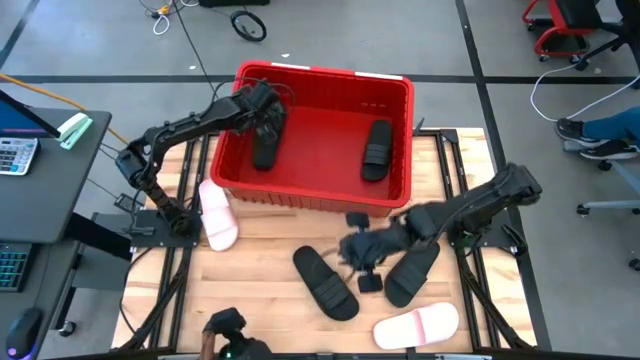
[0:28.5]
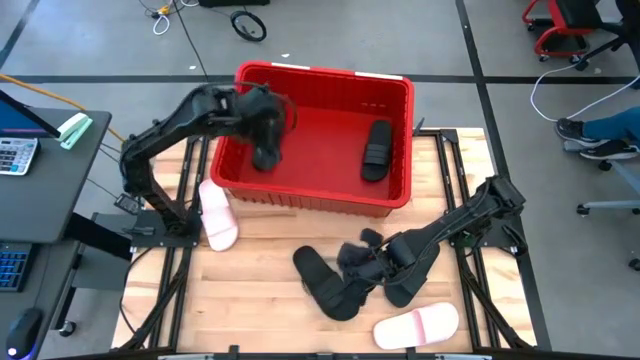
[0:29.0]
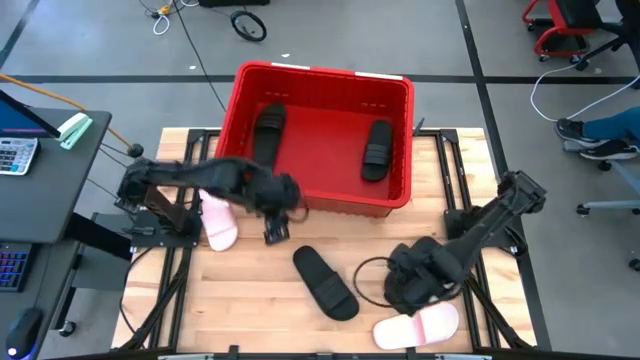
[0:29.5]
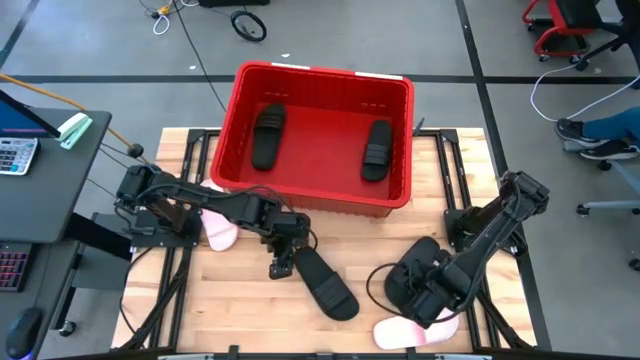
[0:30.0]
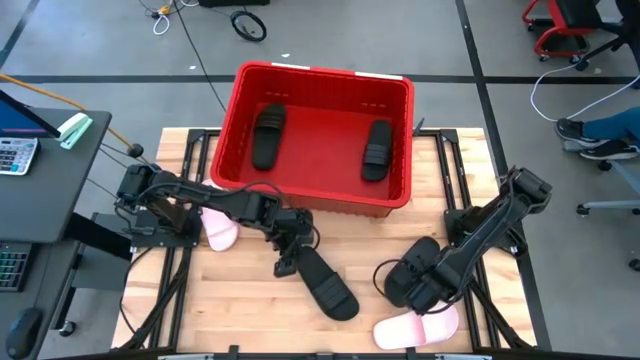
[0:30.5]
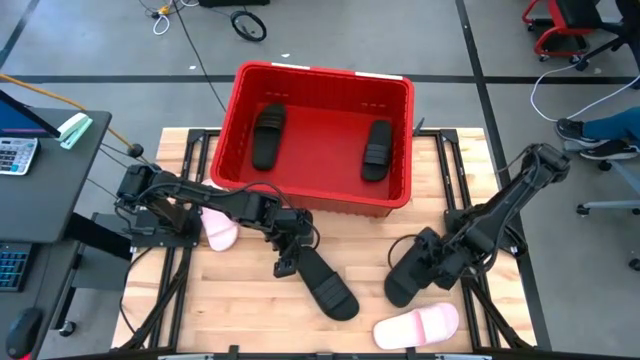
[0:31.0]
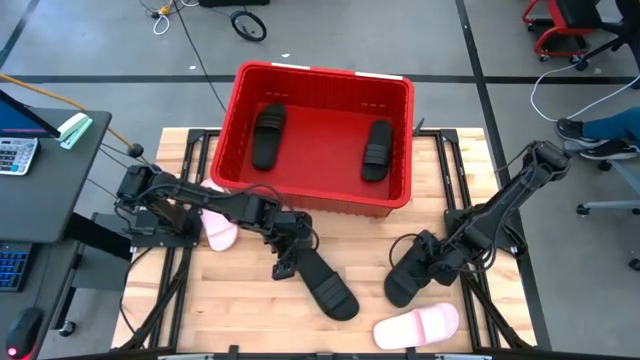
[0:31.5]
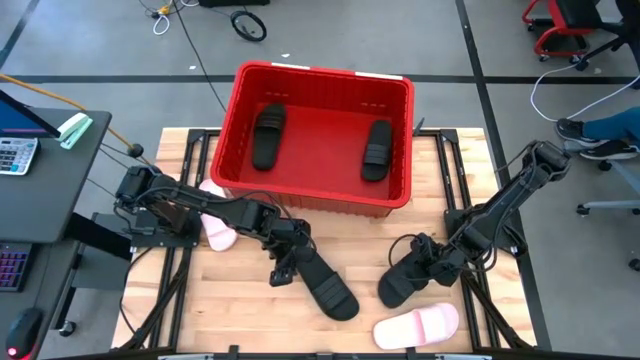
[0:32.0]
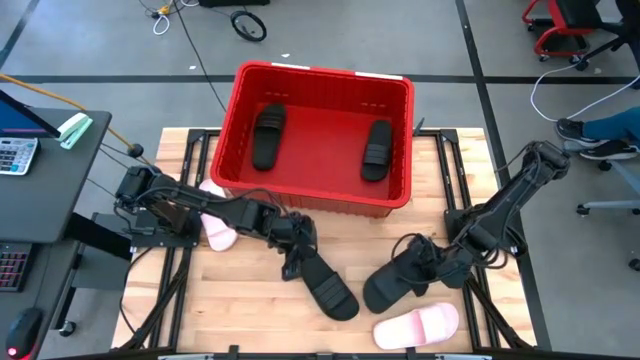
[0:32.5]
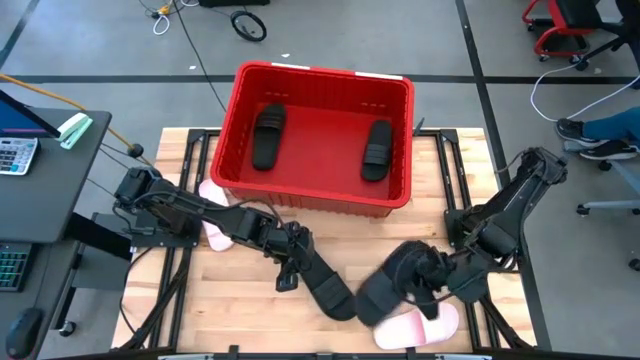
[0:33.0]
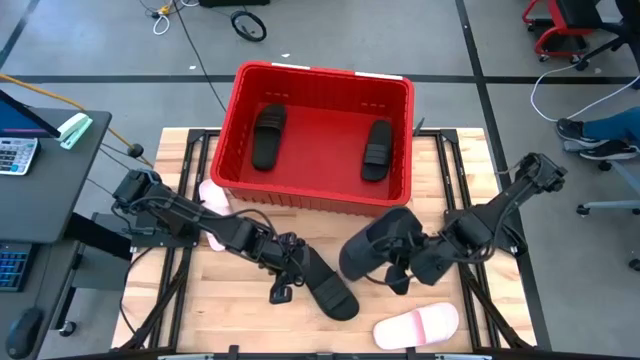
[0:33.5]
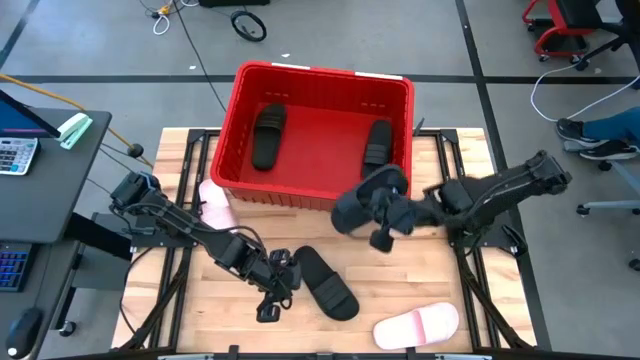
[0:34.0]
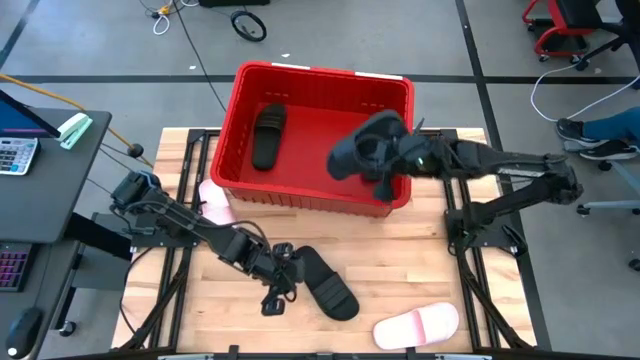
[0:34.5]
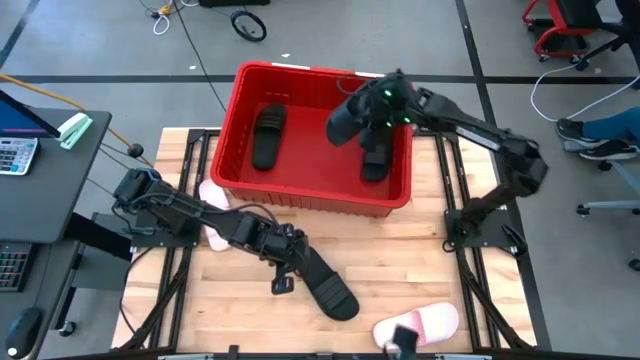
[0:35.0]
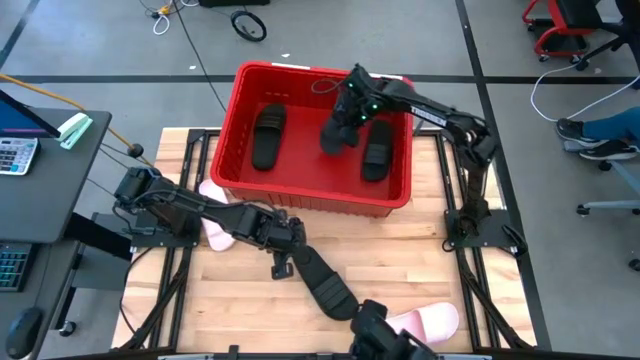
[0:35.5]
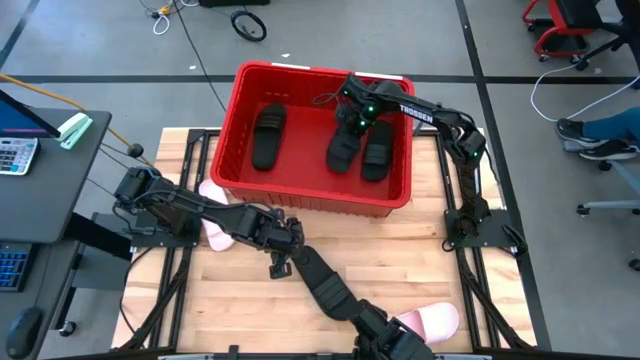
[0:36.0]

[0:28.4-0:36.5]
Task: Pick and place slides into bin
Put the black slide into the bin

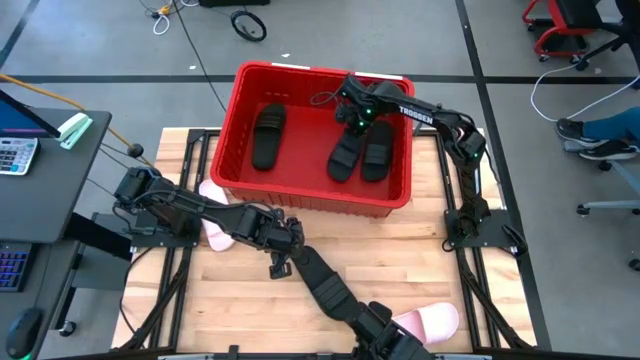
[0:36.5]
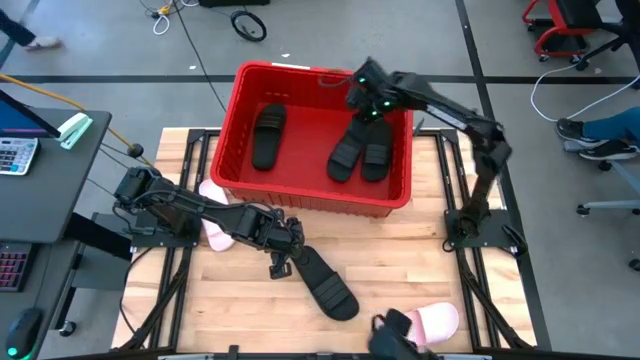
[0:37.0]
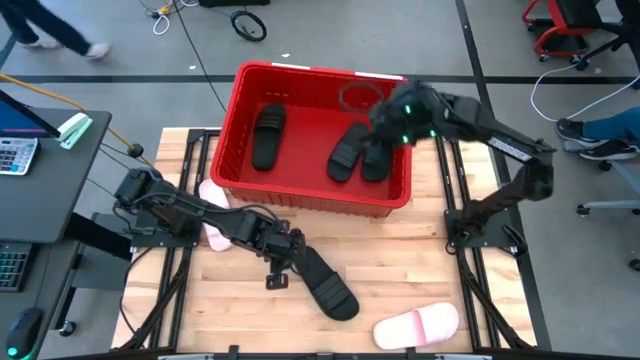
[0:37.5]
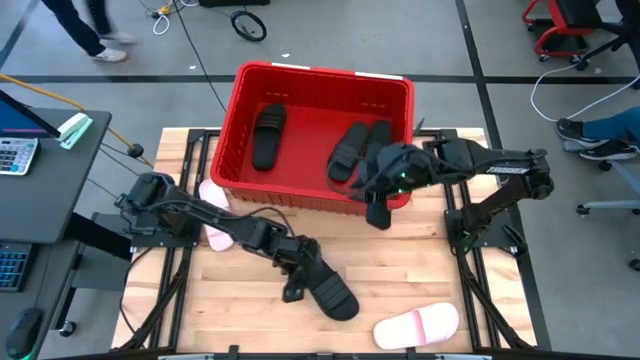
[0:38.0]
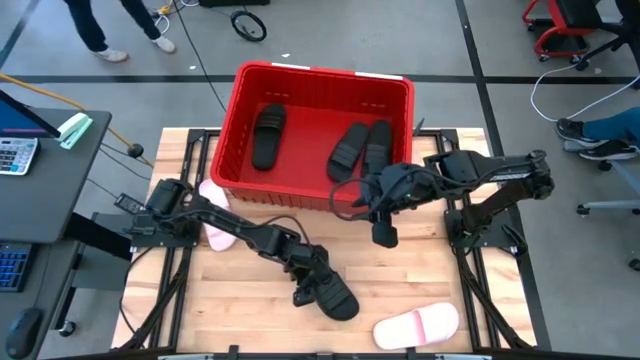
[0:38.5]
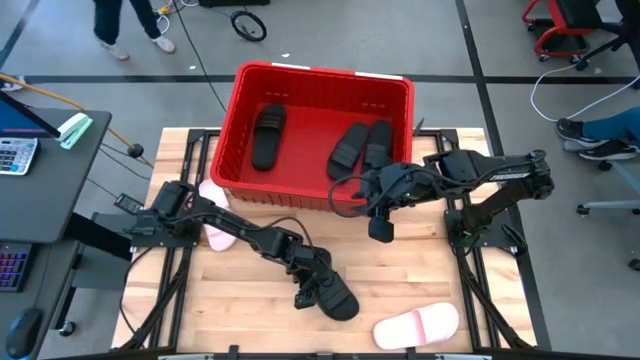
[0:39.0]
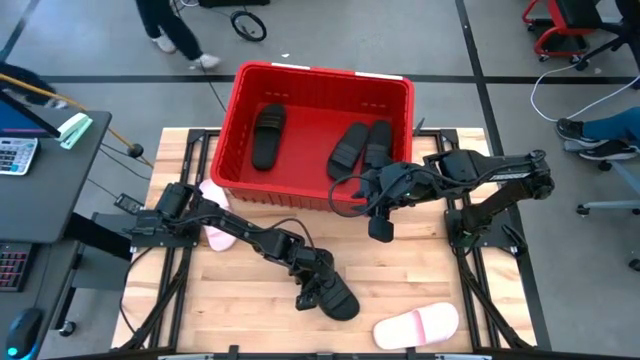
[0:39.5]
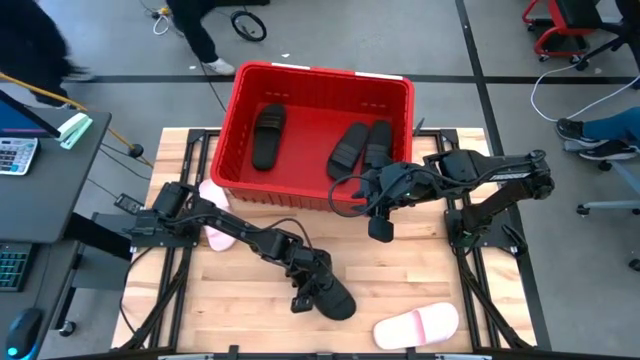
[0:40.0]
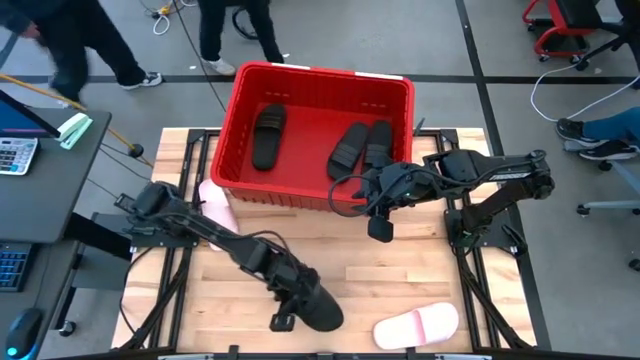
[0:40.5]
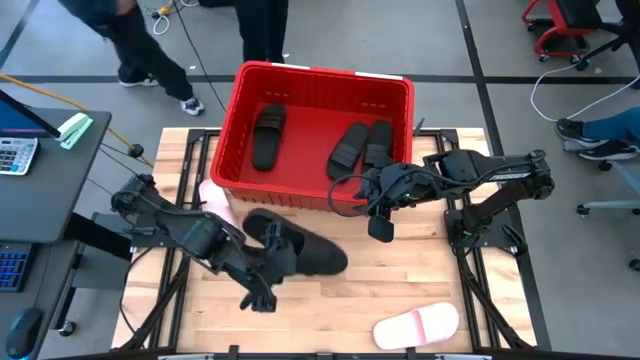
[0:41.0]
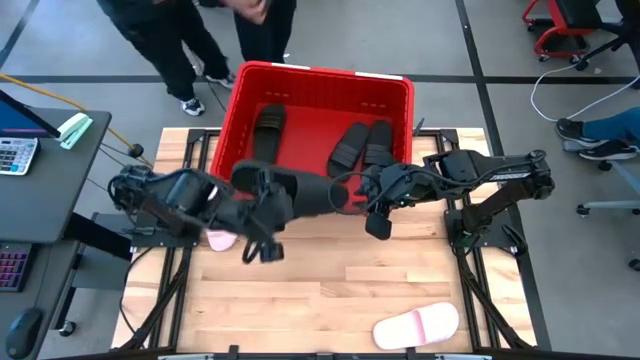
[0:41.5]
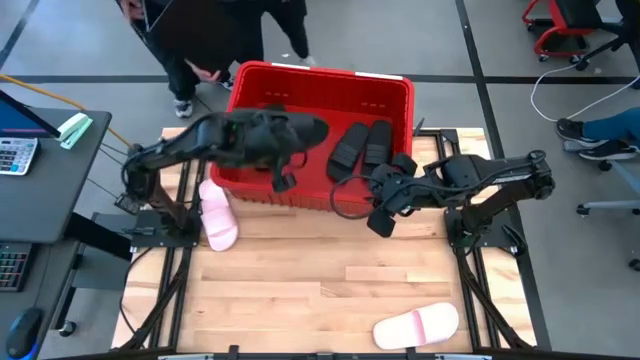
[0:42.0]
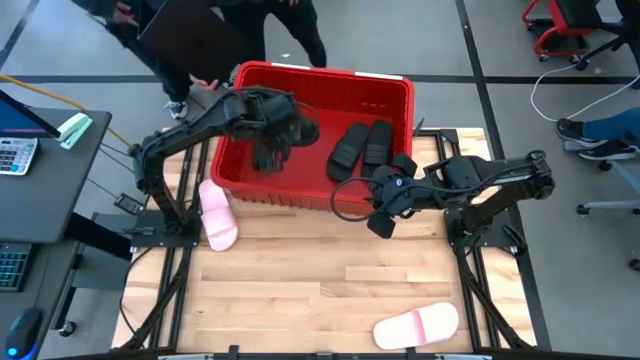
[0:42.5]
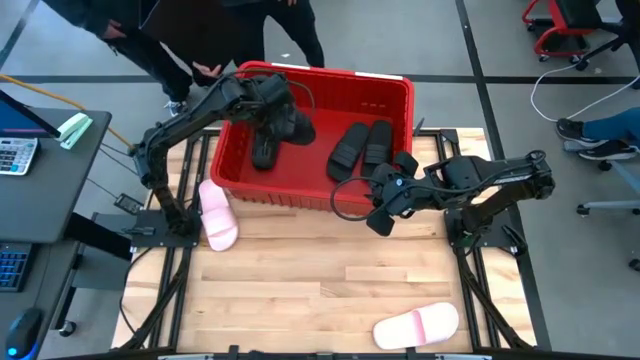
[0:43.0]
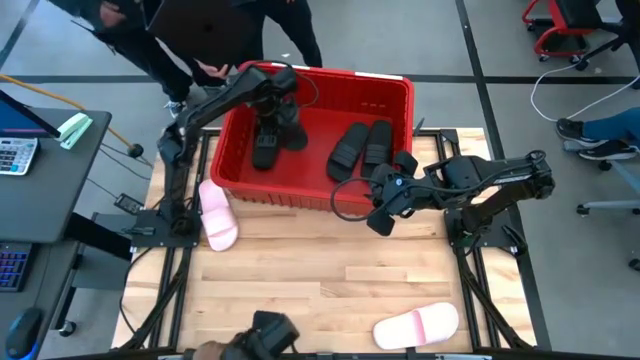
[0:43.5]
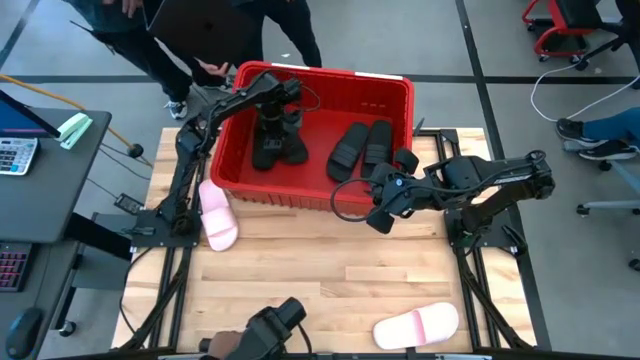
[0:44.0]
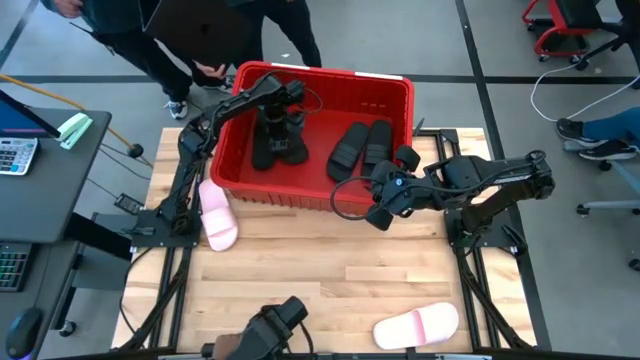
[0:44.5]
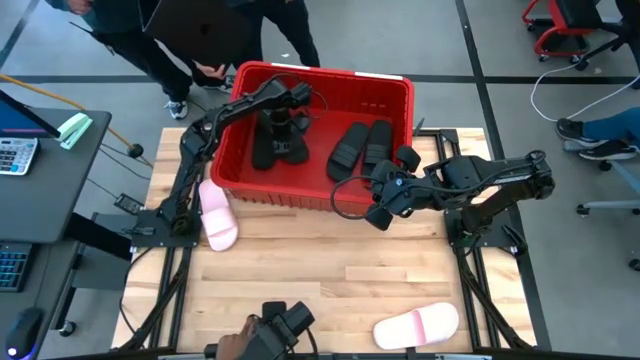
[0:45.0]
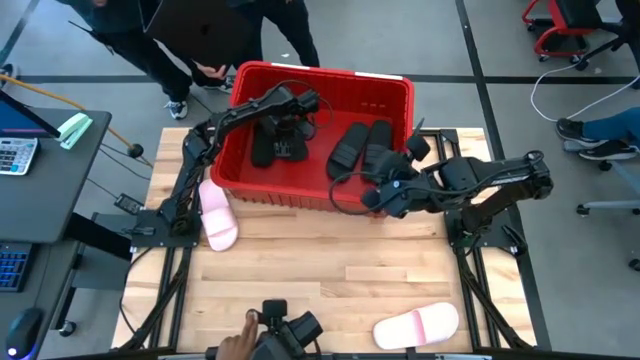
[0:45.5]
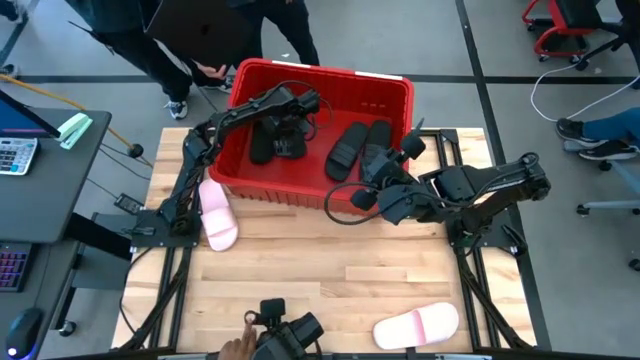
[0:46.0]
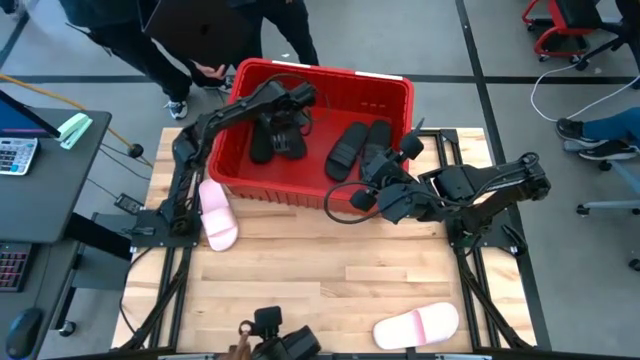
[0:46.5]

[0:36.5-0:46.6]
Put the black slide into the bin
